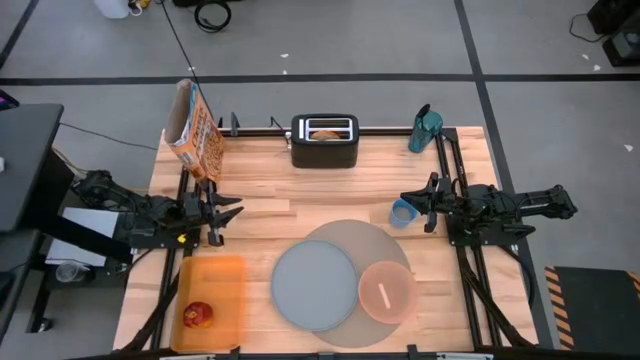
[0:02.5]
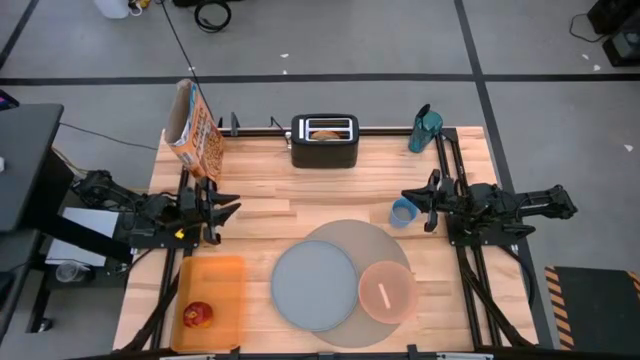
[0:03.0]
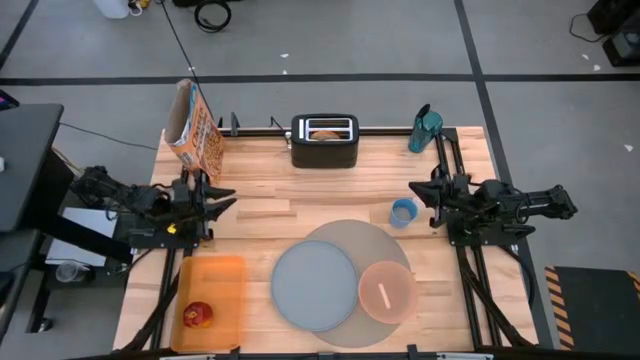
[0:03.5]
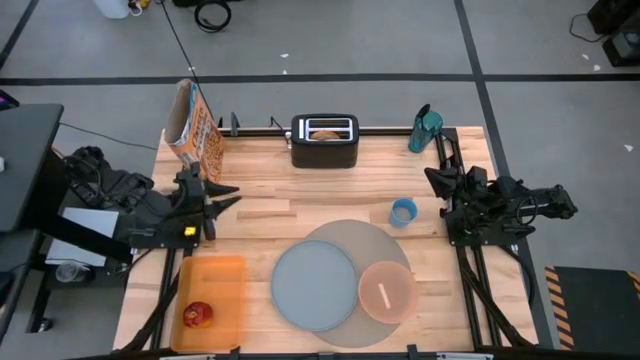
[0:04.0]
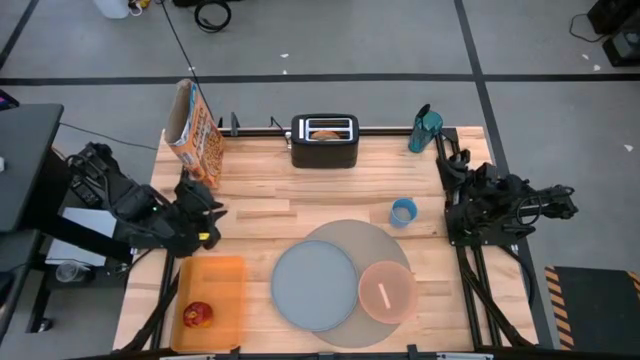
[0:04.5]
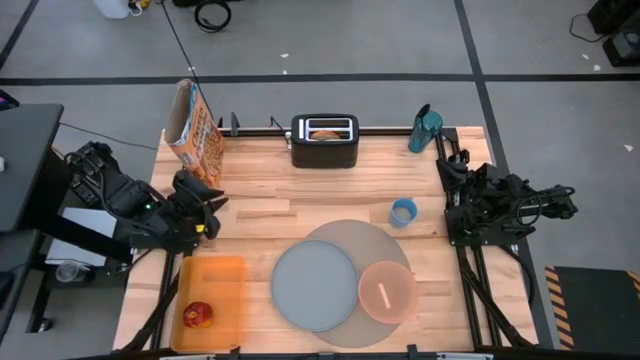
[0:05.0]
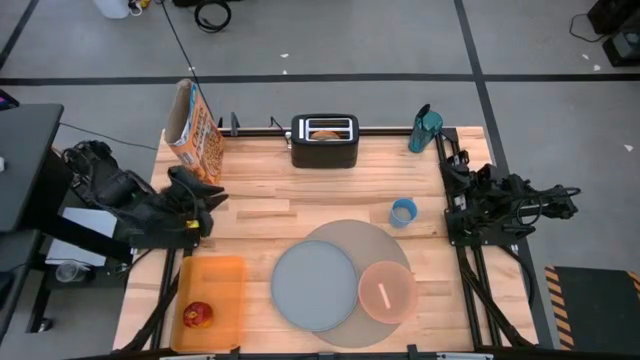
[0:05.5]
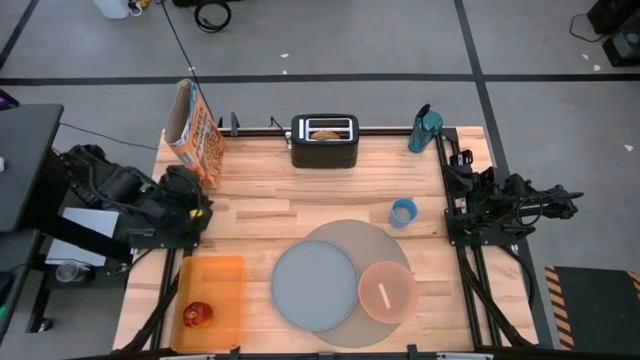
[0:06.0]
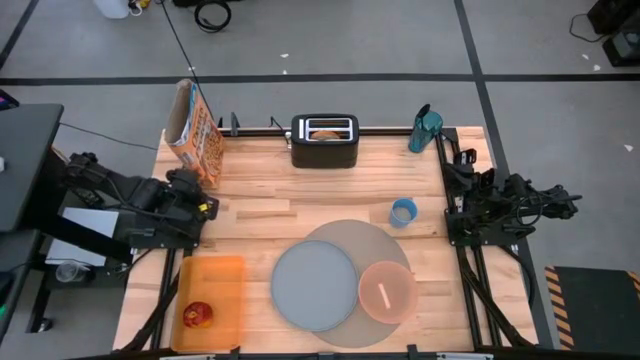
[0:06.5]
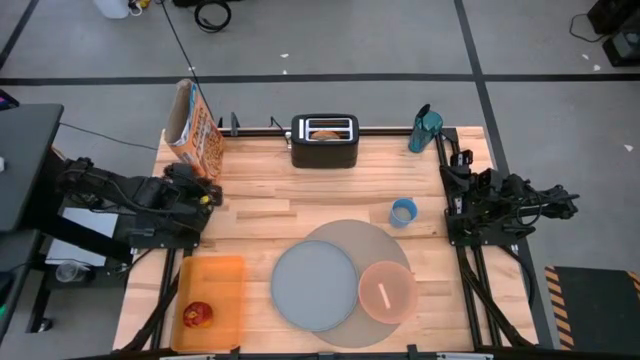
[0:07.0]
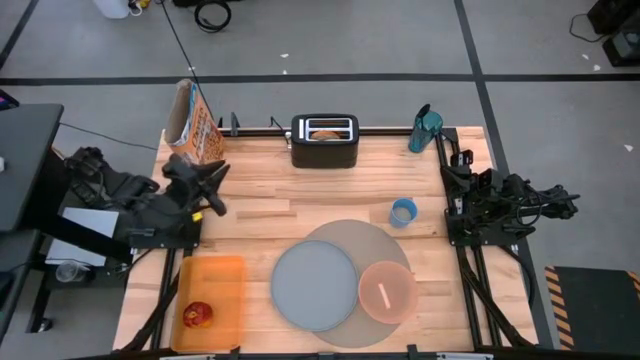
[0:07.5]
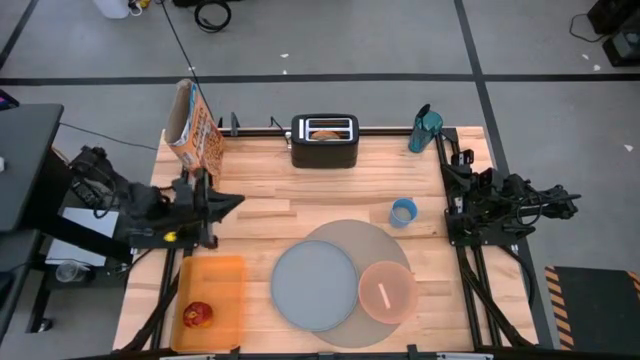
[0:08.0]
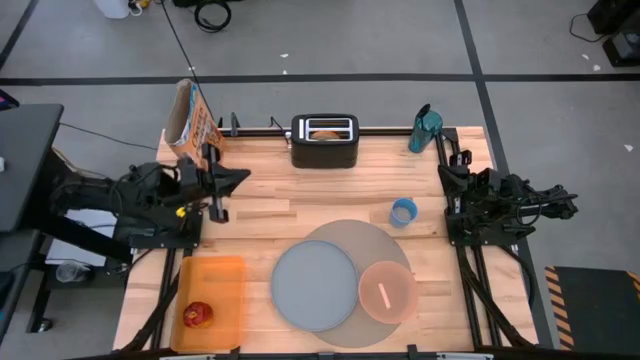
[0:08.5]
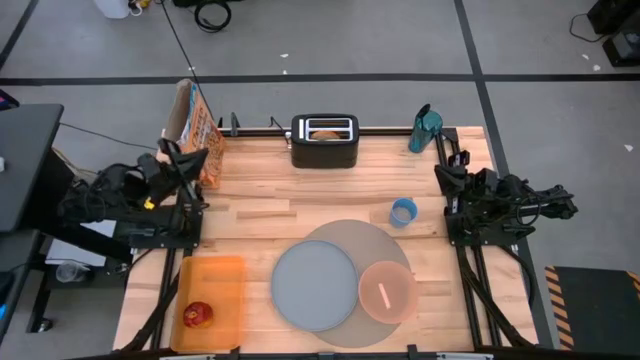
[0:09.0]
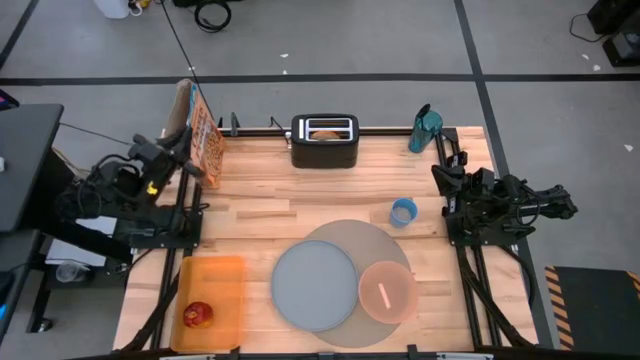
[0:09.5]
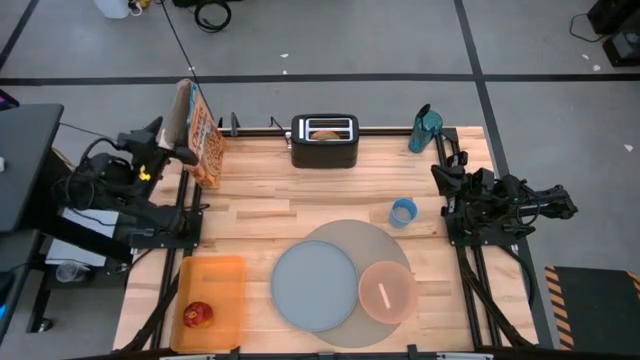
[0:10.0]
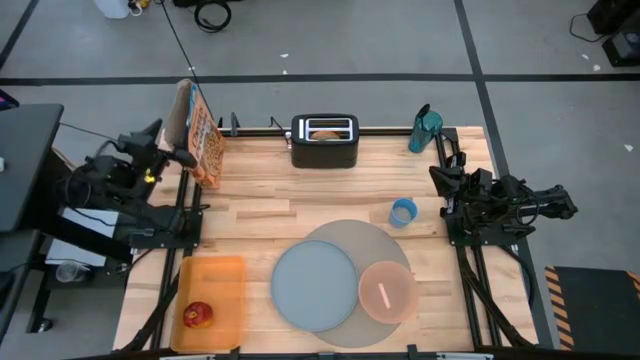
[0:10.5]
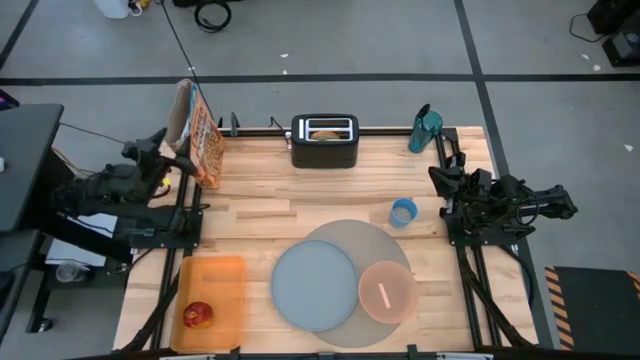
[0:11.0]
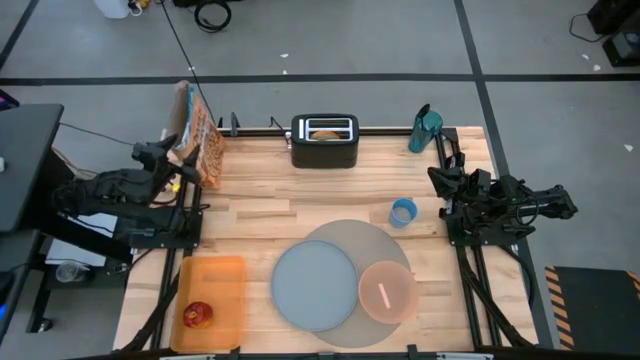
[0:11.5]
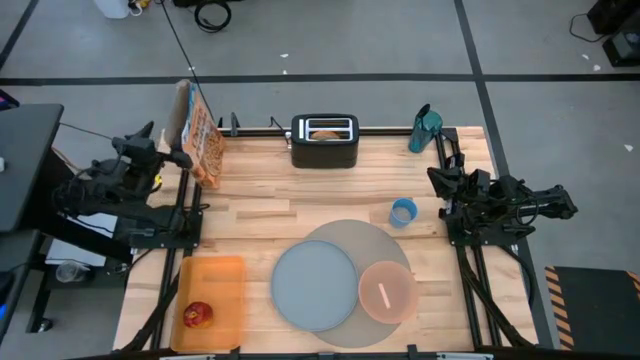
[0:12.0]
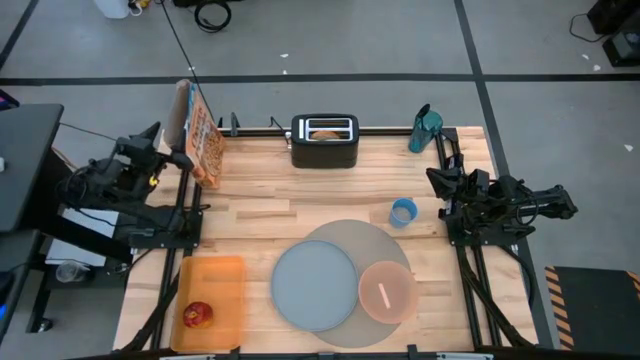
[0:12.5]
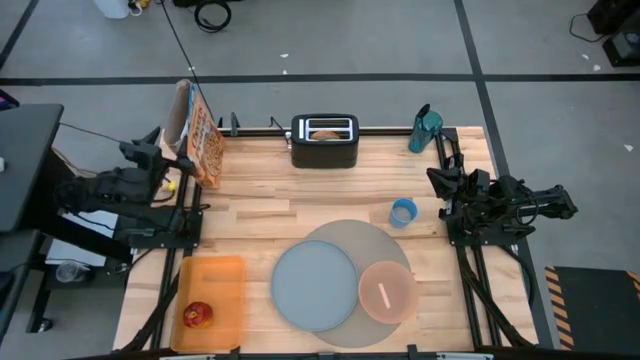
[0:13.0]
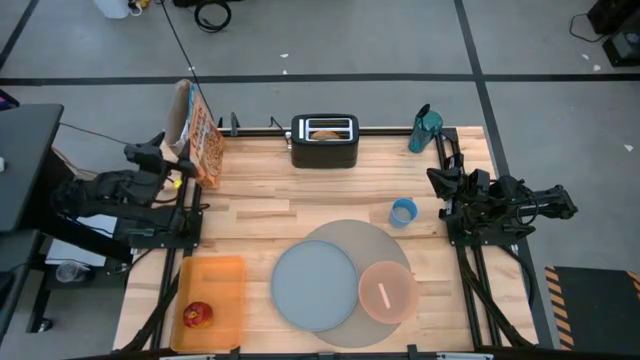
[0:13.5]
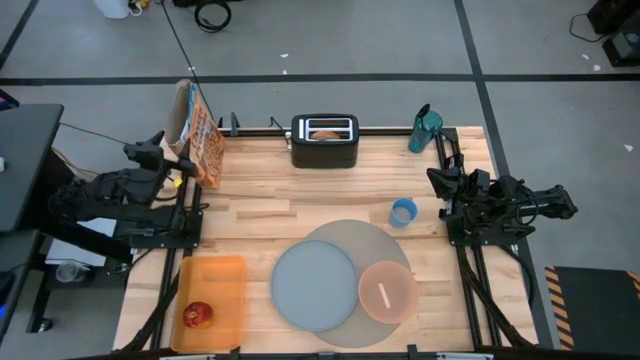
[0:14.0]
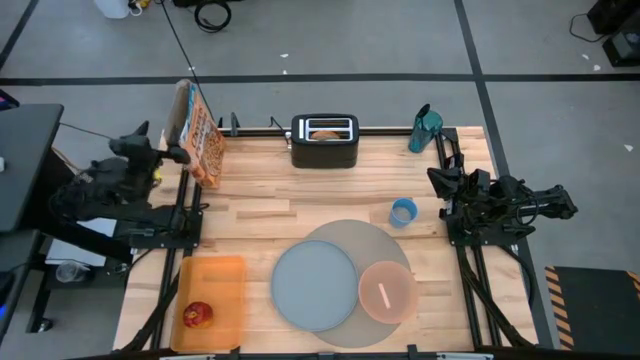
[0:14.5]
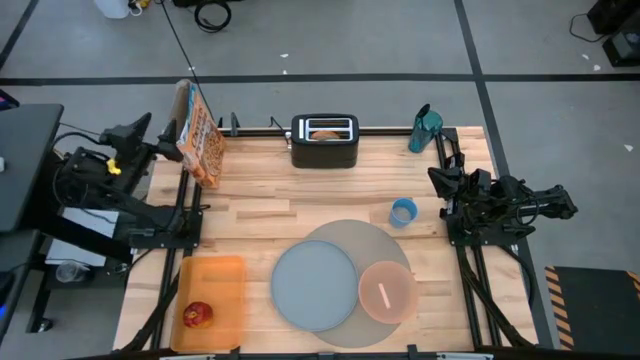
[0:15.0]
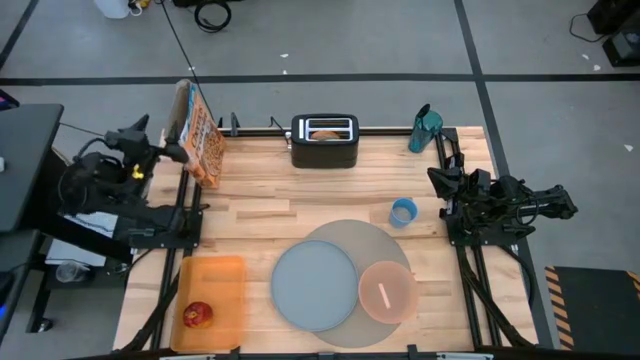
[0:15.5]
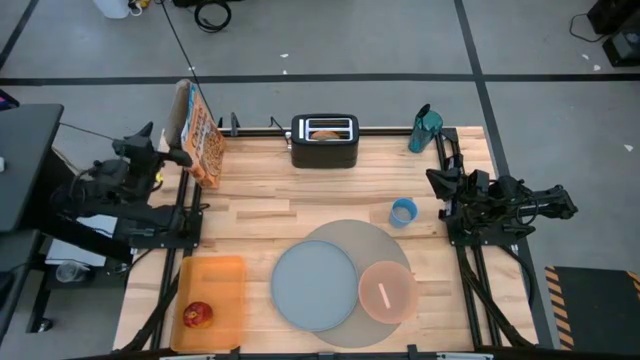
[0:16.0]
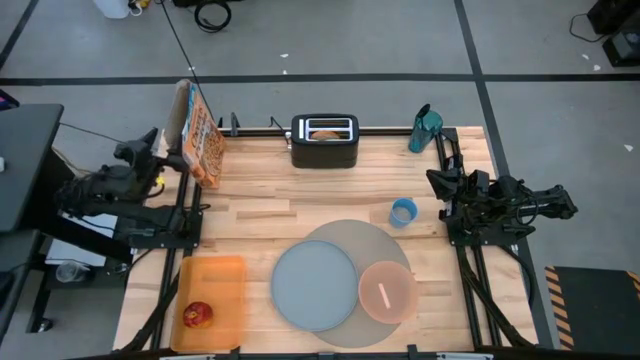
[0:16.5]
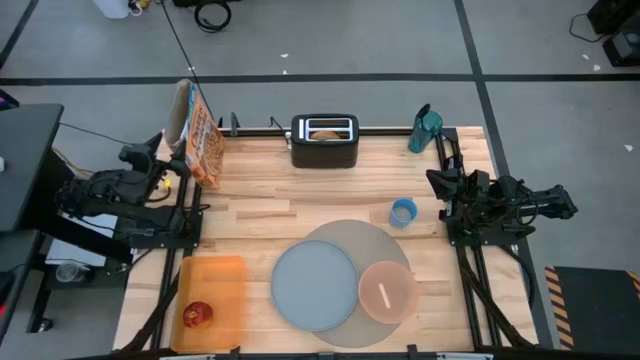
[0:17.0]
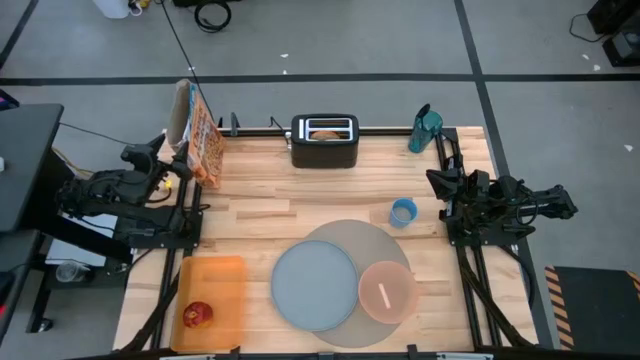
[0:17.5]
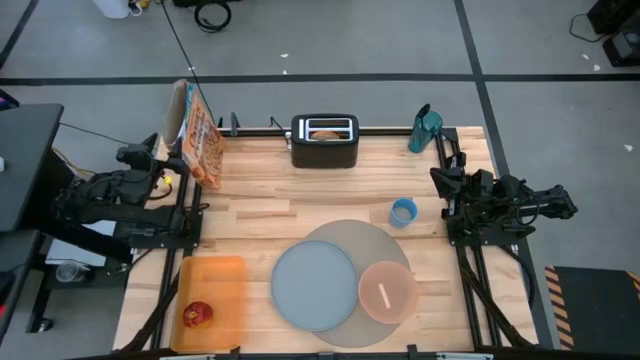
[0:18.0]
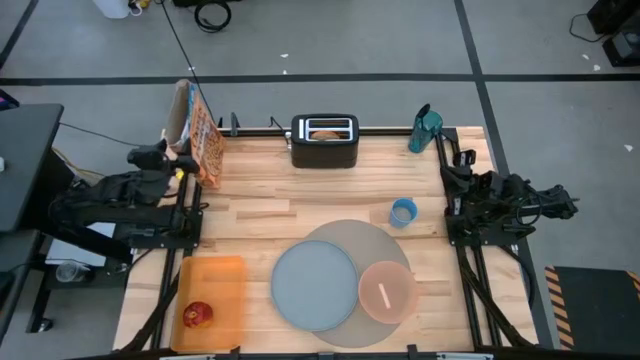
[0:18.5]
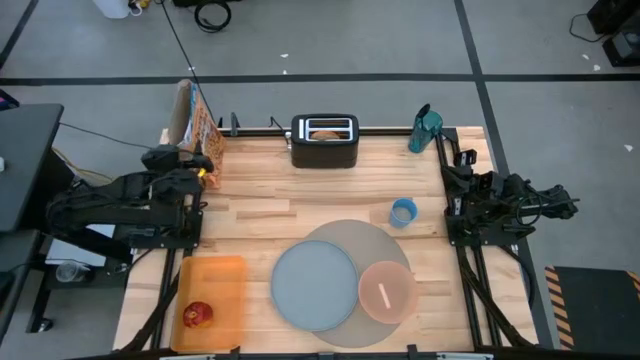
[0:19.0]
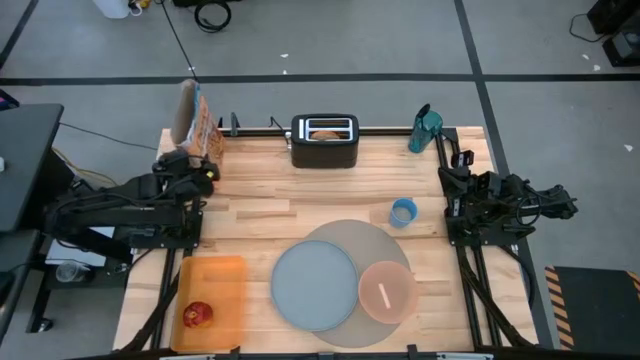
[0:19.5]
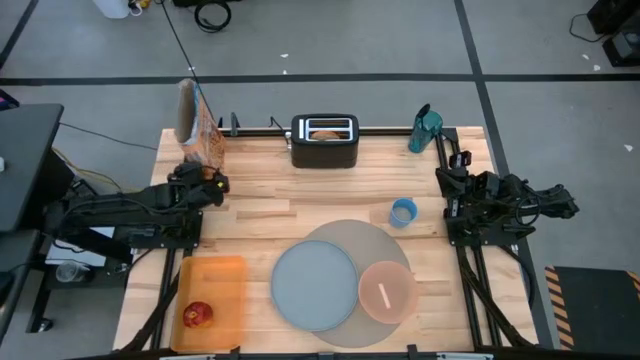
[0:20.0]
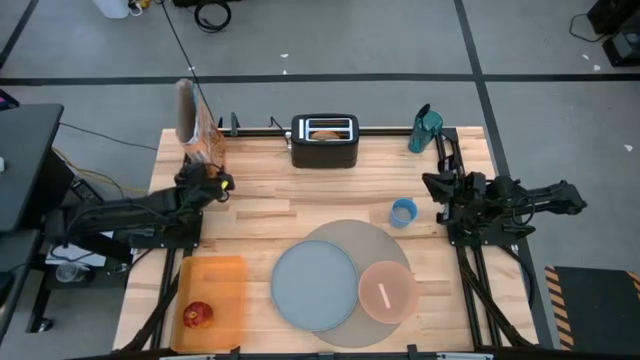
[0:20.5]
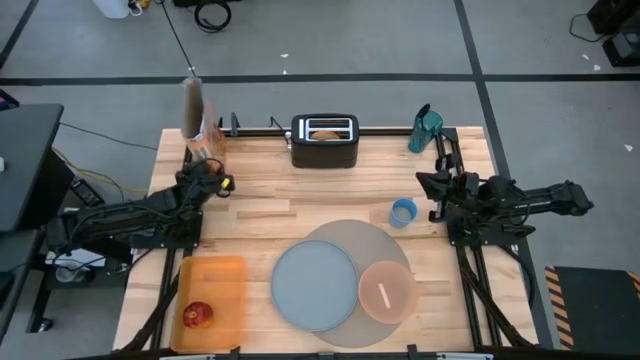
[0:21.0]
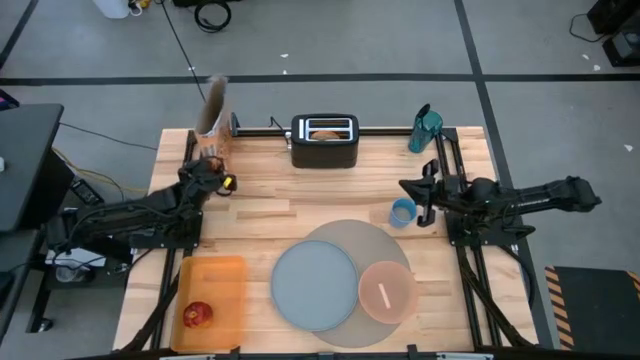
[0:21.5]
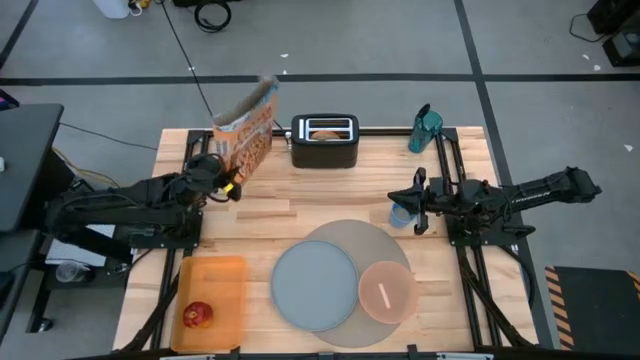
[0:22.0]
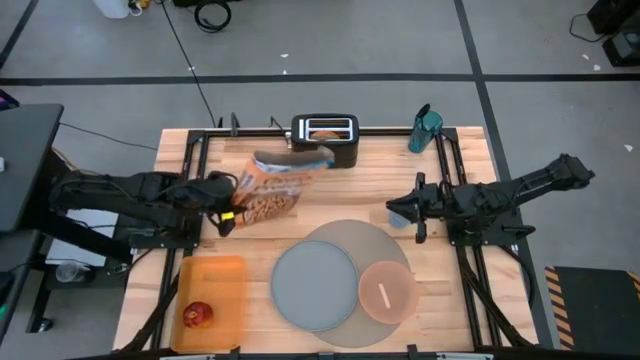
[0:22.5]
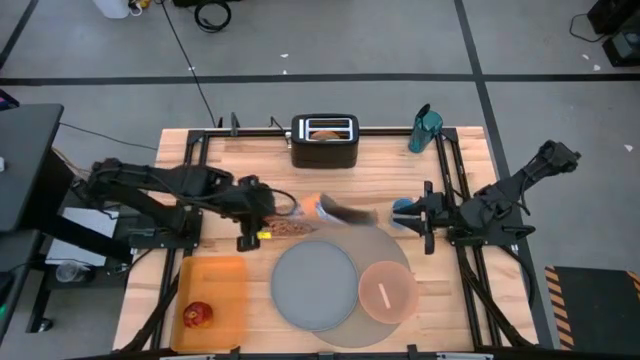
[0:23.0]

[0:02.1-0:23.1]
Task: Arrange a breakfast setting
Pour the cereal from the cereal box into the pink bowl
